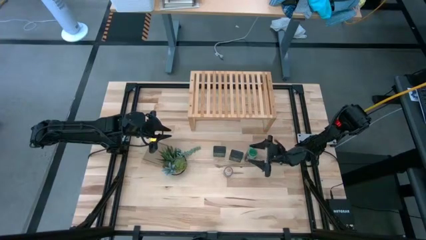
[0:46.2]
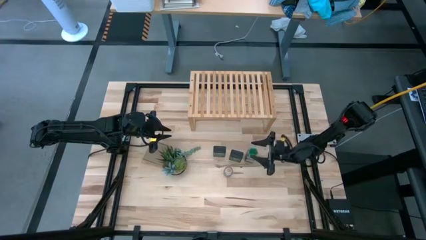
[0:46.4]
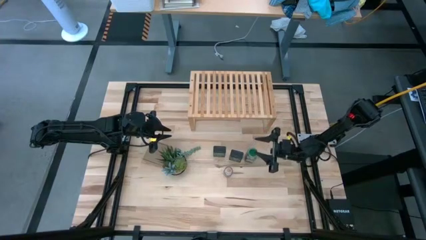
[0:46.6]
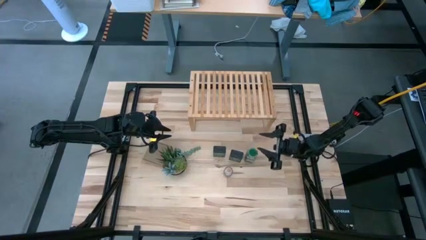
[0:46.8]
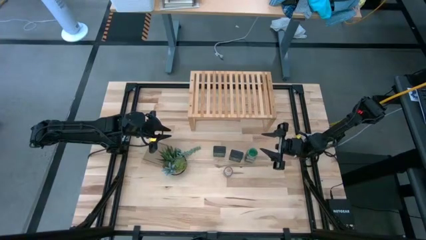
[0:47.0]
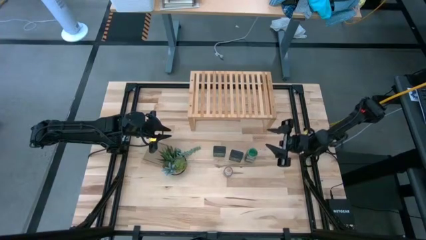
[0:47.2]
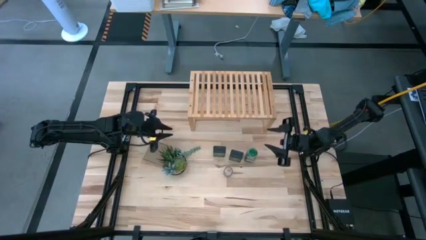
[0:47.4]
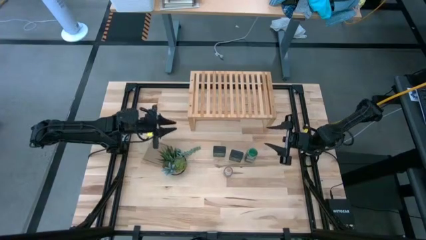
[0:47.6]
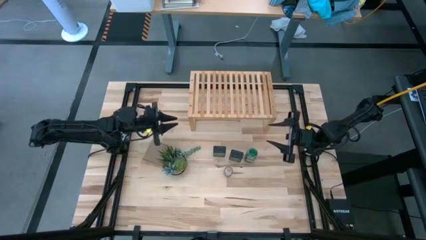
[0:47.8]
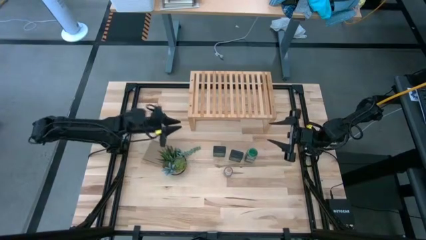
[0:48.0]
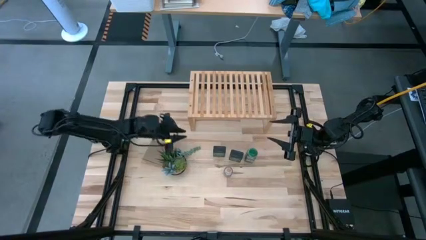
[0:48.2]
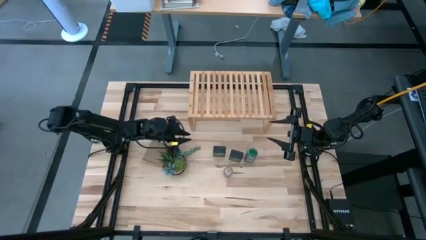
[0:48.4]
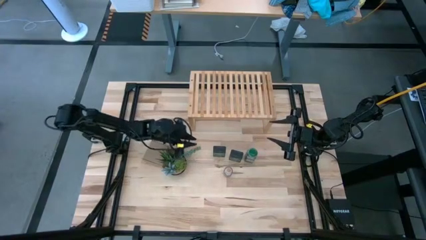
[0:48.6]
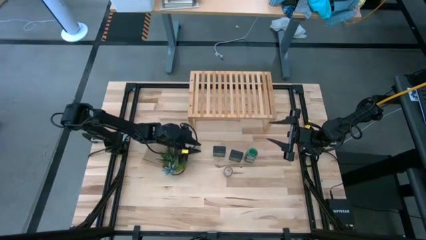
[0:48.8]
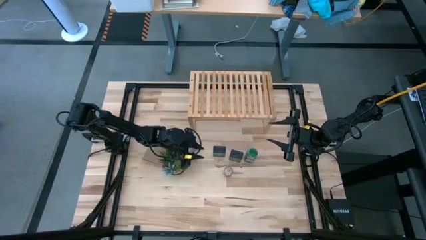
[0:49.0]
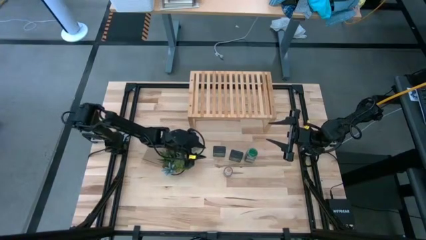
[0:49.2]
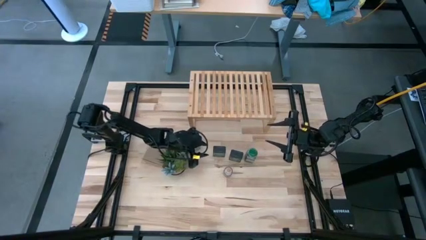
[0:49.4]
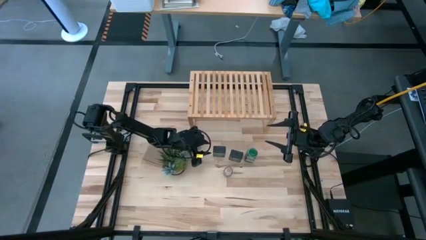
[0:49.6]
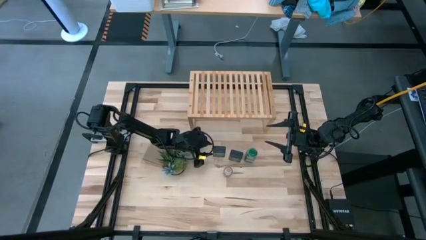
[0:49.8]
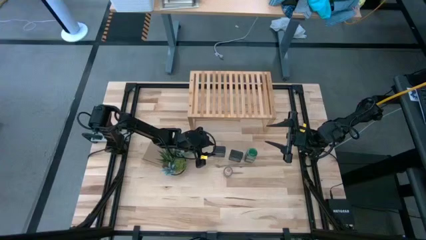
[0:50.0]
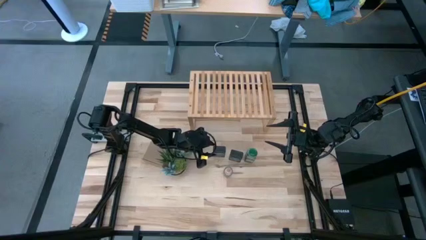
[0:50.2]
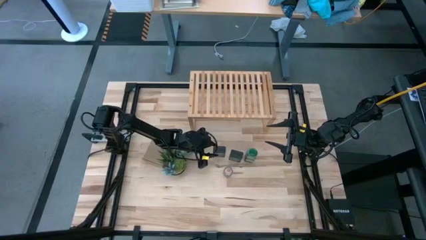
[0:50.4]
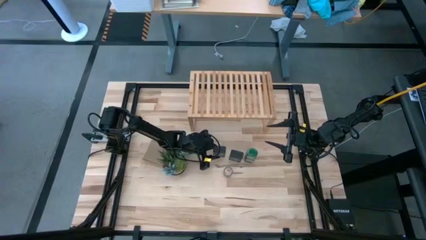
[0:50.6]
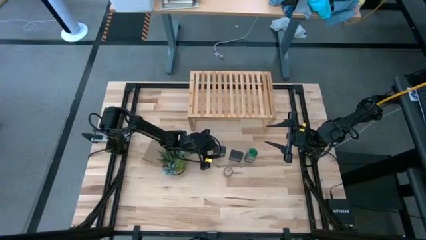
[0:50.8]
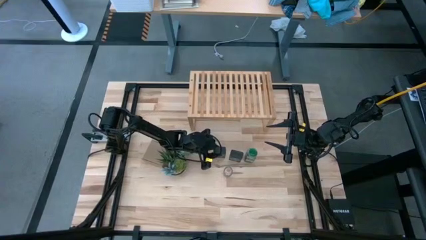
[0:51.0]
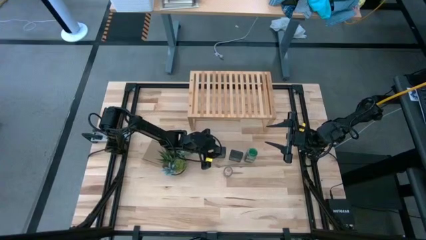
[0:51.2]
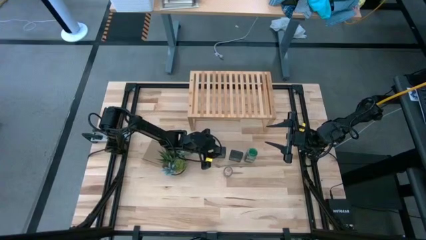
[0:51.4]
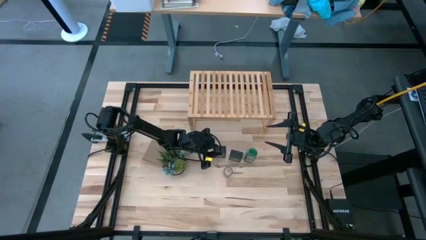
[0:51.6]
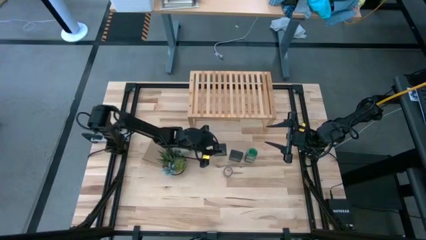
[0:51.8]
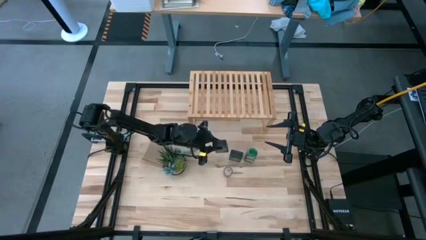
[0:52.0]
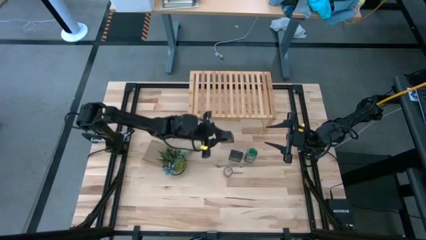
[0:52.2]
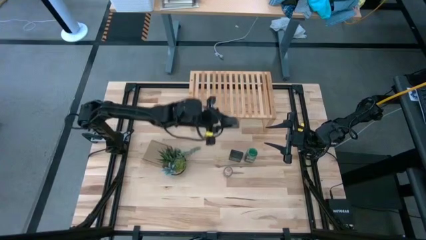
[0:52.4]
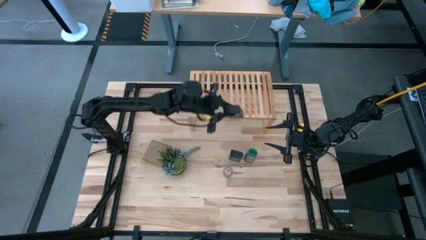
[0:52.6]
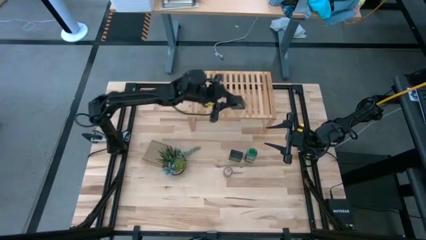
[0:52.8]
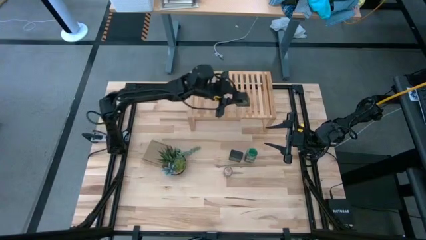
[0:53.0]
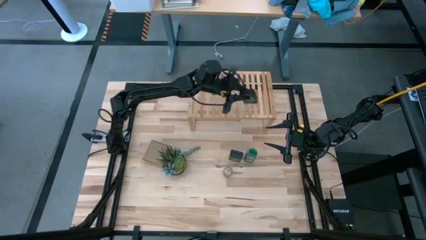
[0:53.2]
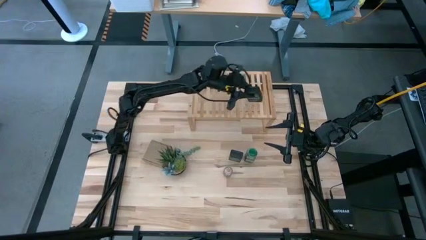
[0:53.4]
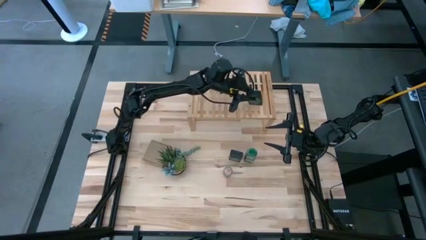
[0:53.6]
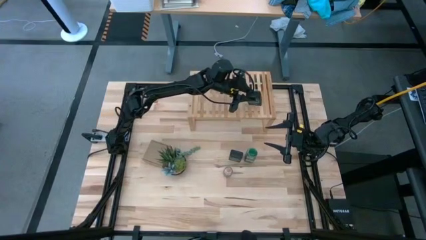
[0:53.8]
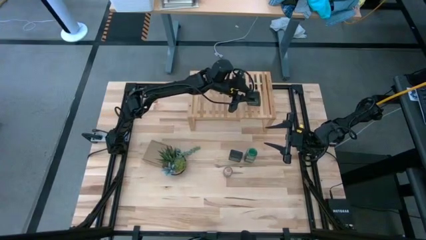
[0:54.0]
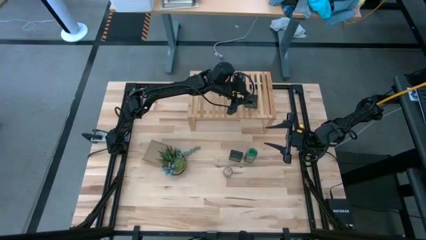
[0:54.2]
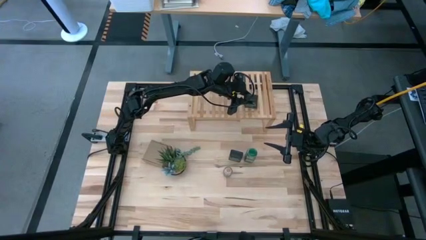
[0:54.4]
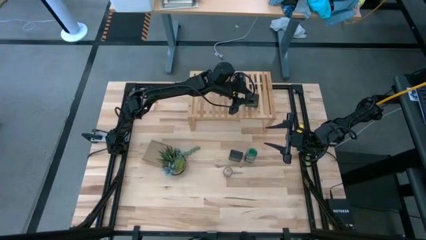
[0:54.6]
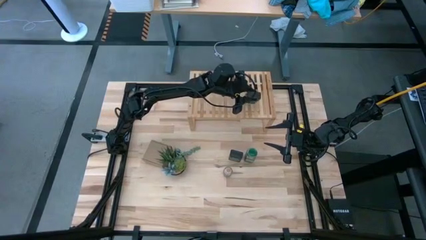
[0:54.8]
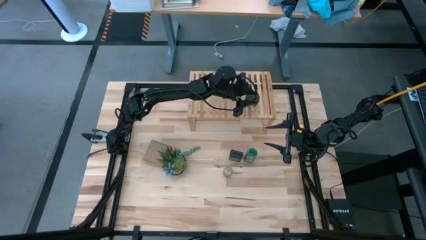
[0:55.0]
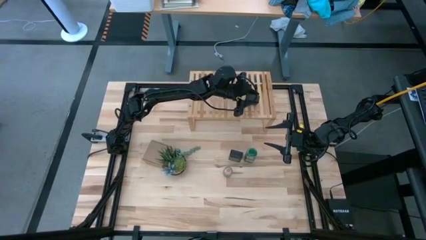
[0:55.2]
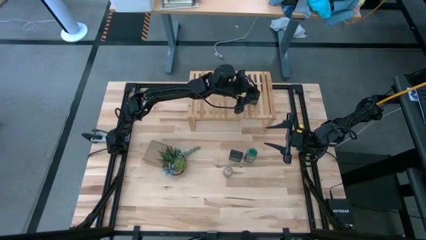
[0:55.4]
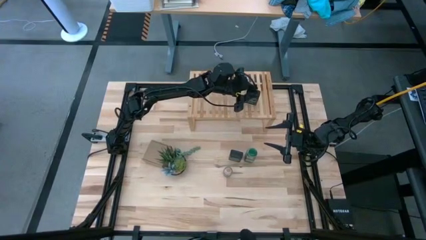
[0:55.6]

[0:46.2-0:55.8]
Task: Shelf spices
Put the green seasoning can on the shelf

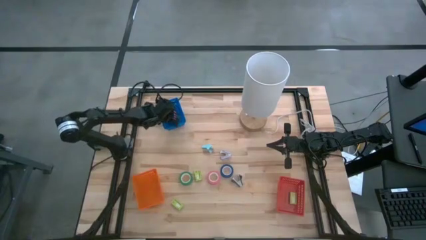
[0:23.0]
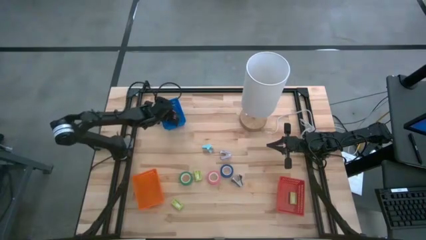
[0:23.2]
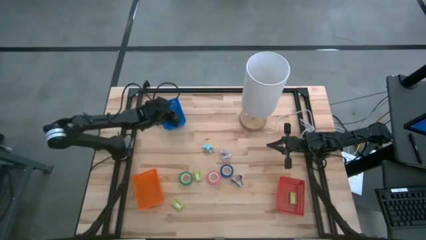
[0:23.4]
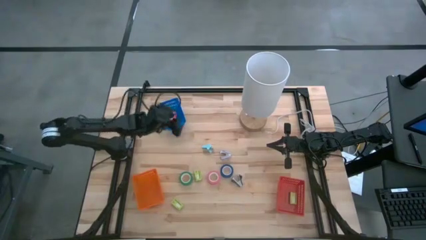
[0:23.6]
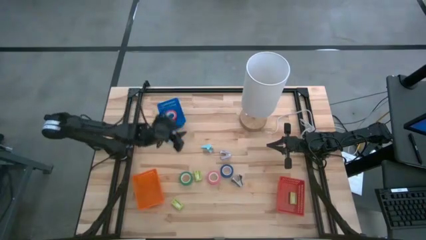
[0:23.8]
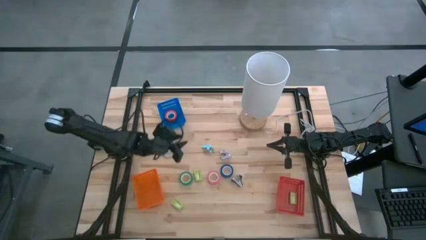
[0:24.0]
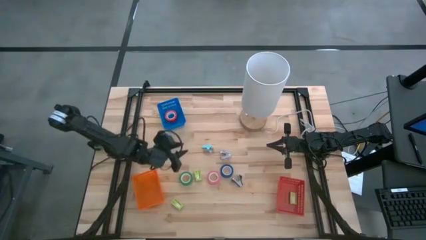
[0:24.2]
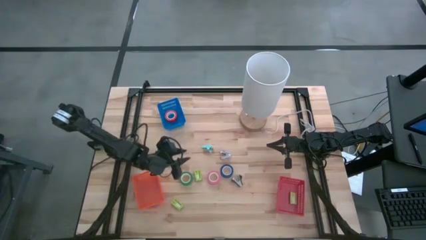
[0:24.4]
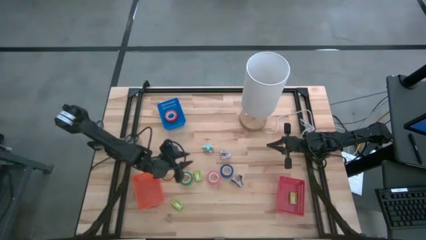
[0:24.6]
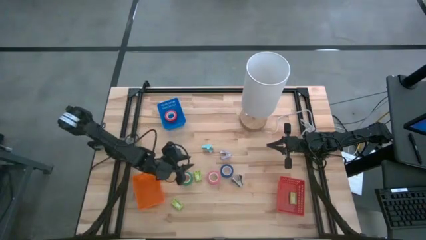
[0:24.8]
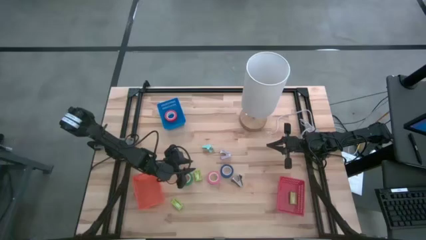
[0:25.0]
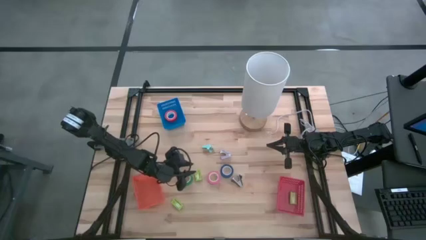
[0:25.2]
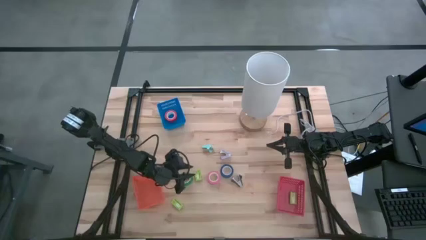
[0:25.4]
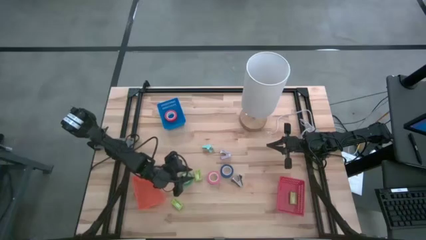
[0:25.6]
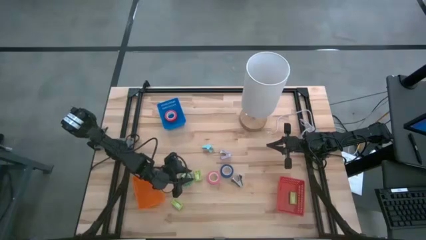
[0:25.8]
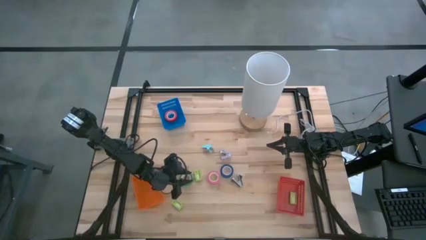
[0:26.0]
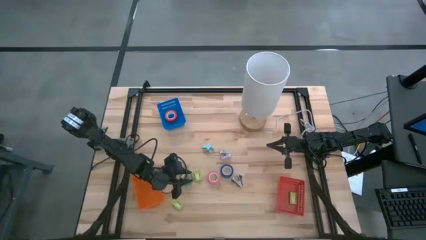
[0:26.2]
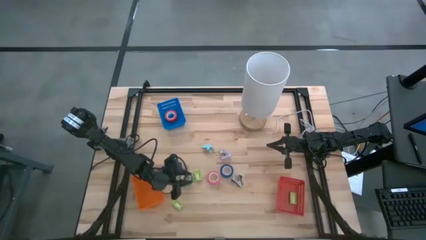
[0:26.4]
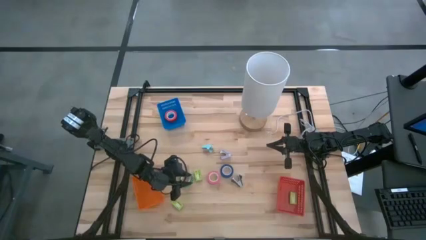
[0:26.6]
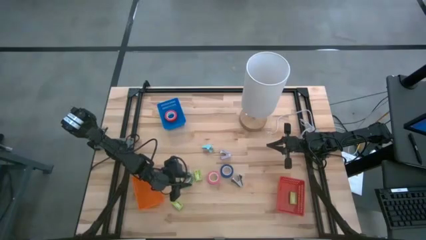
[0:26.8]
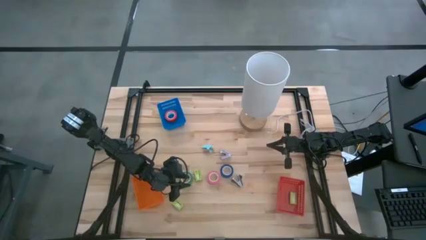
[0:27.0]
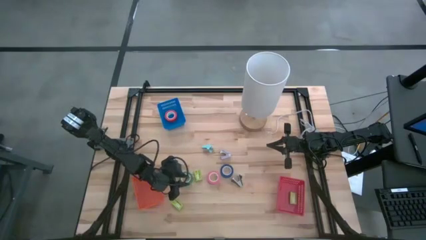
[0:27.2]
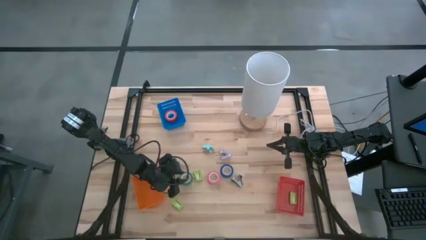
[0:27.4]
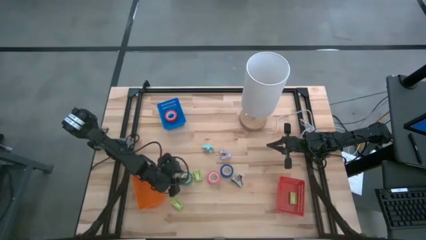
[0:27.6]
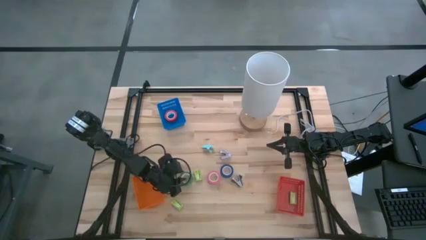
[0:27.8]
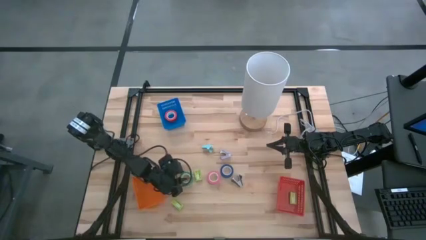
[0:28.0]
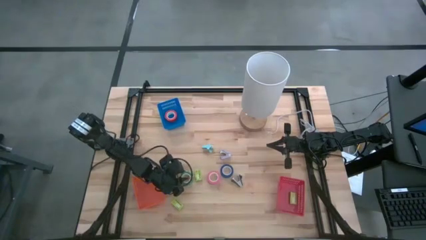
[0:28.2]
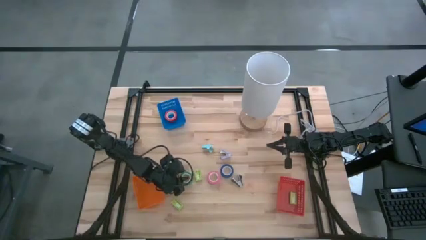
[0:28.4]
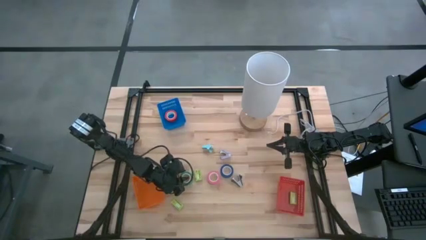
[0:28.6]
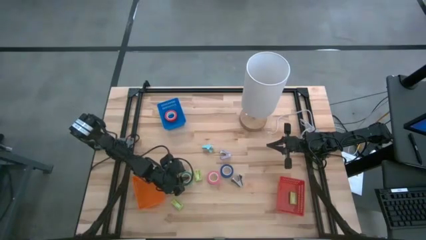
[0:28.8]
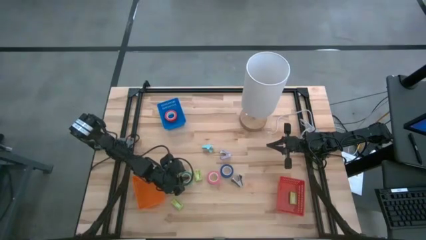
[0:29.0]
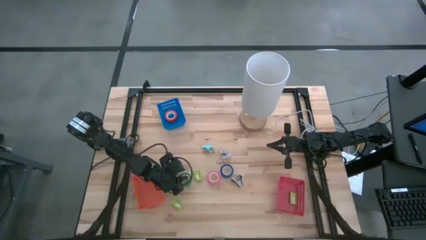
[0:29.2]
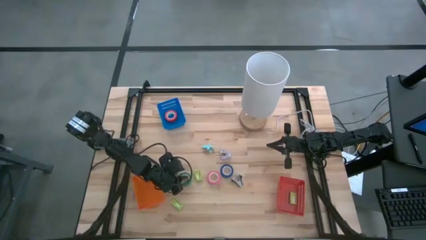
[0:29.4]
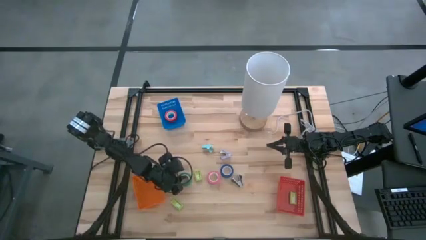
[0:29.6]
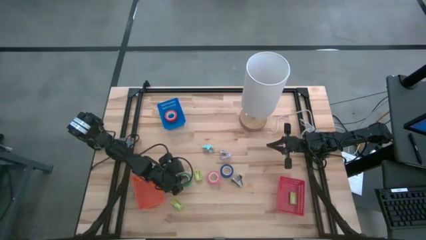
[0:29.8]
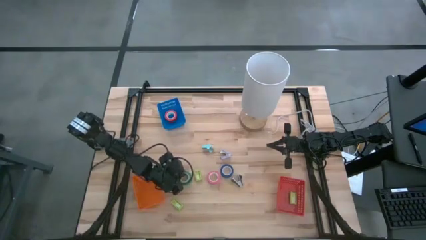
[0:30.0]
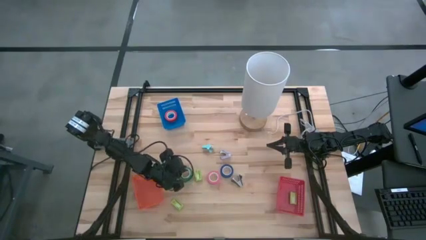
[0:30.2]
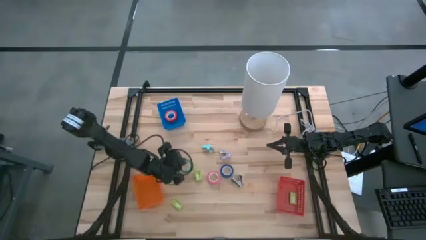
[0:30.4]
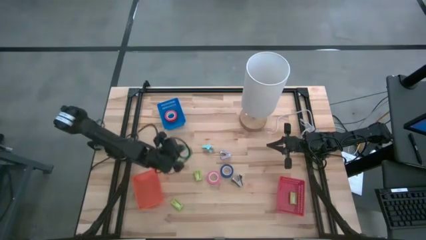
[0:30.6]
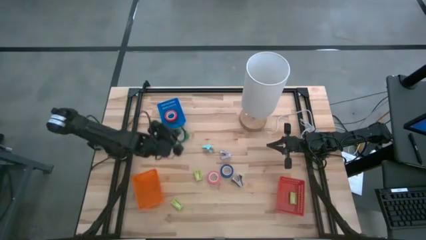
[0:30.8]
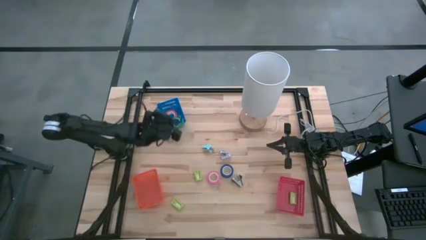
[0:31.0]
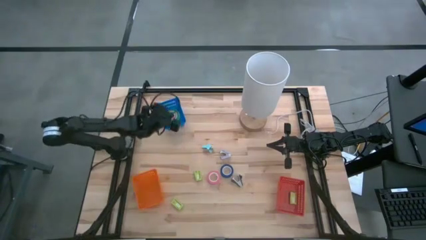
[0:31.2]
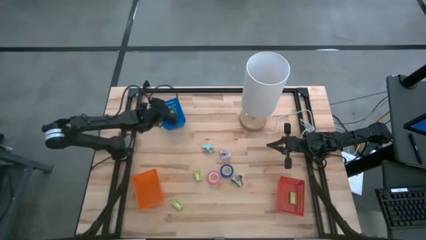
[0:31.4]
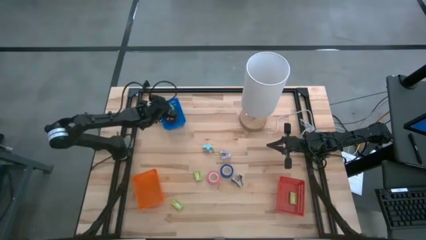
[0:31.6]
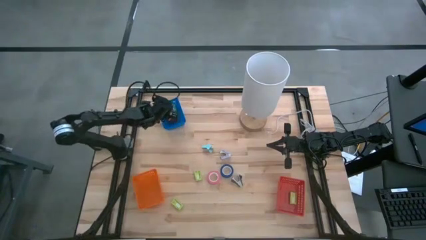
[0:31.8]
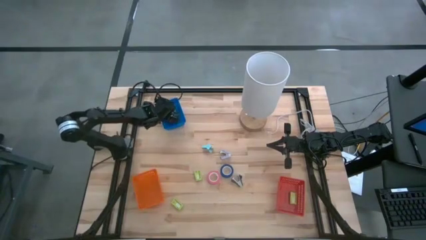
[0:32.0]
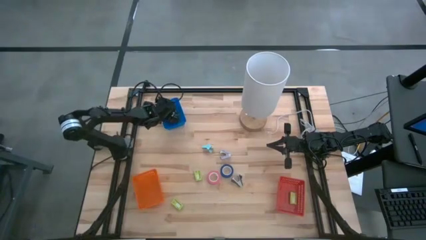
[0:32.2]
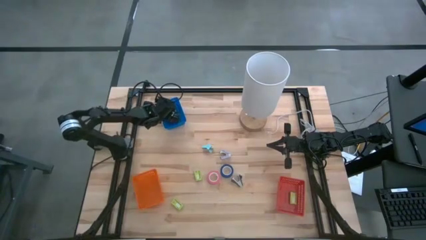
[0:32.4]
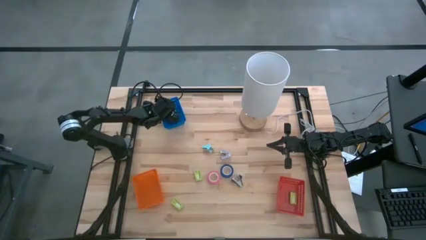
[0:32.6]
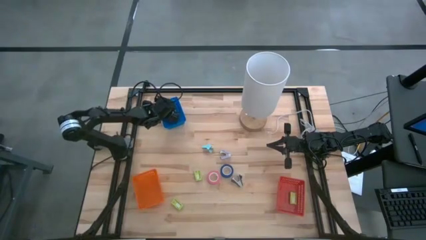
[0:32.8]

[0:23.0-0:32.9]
Task: Pick and place Stapler, Stapler remover, tape
Put the green tape into the blue basket
